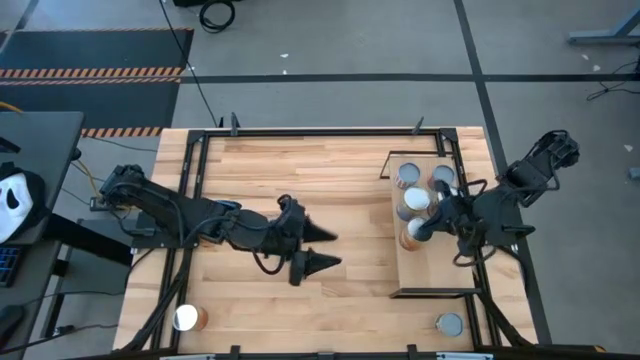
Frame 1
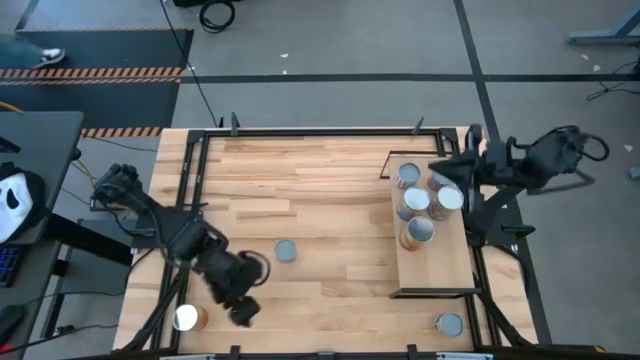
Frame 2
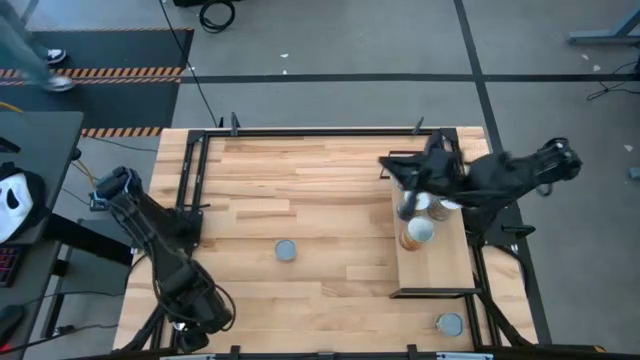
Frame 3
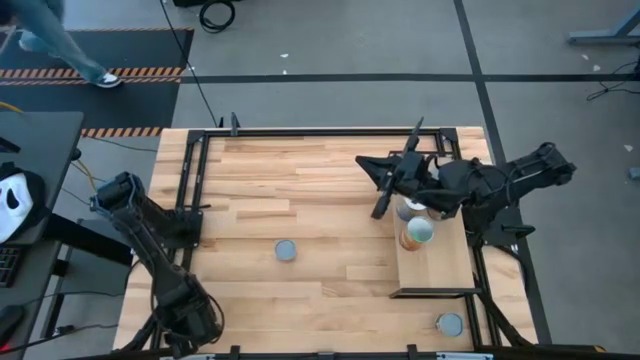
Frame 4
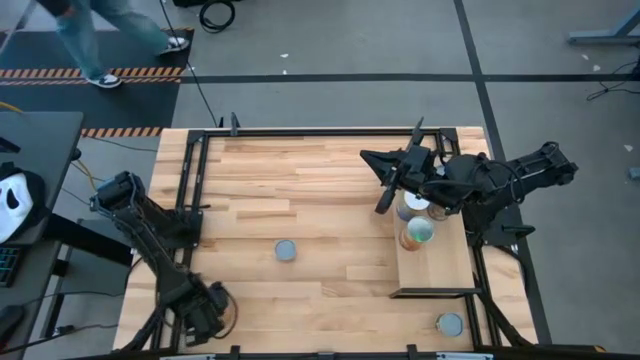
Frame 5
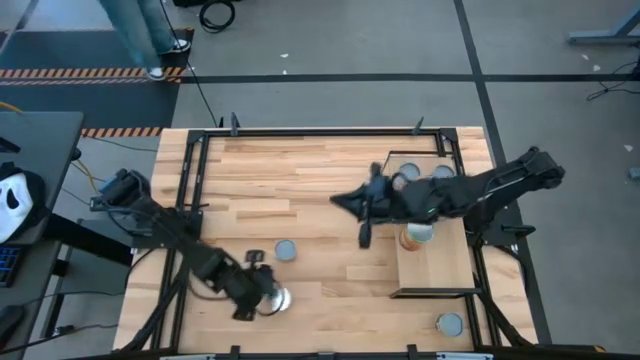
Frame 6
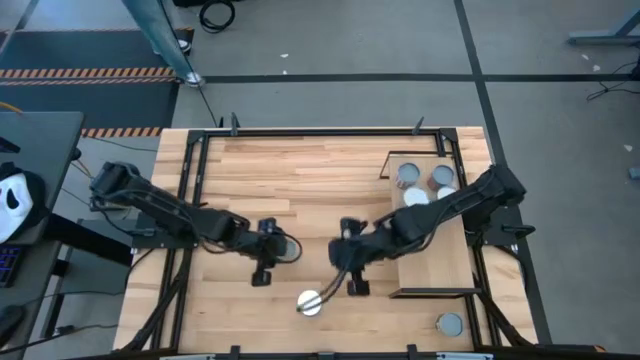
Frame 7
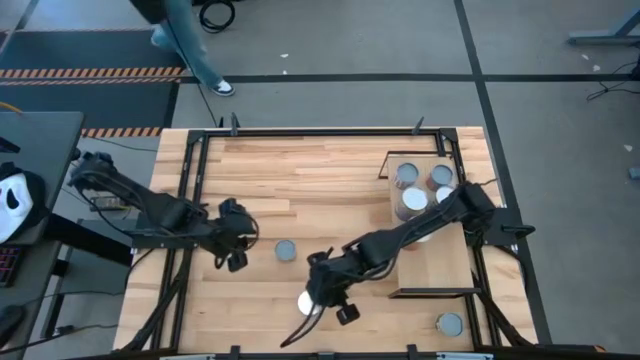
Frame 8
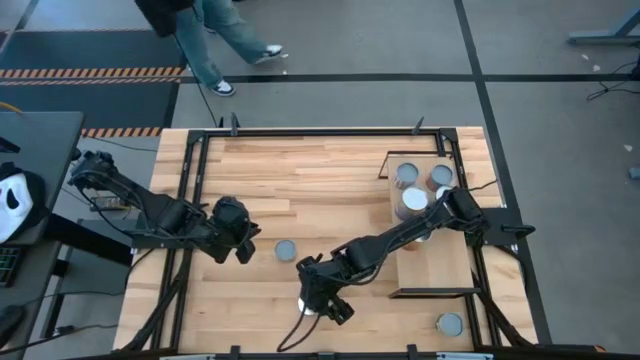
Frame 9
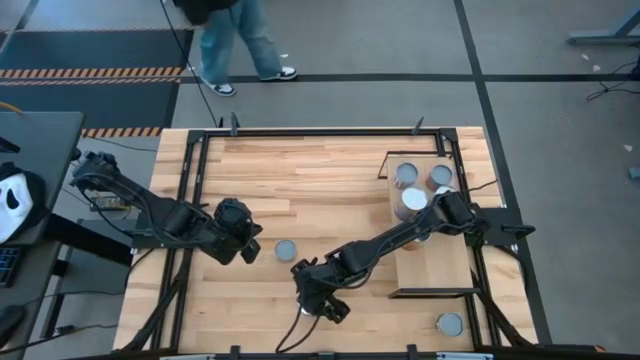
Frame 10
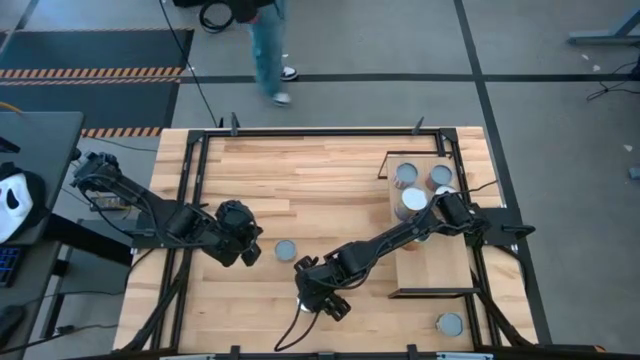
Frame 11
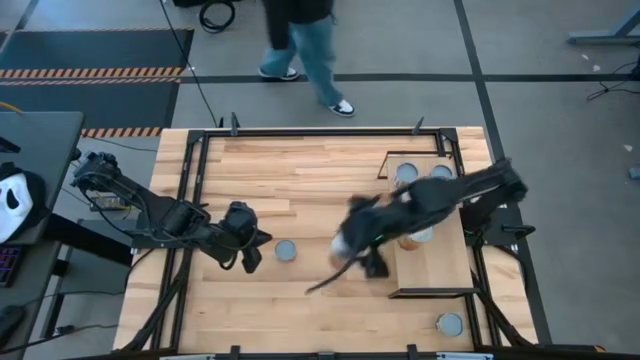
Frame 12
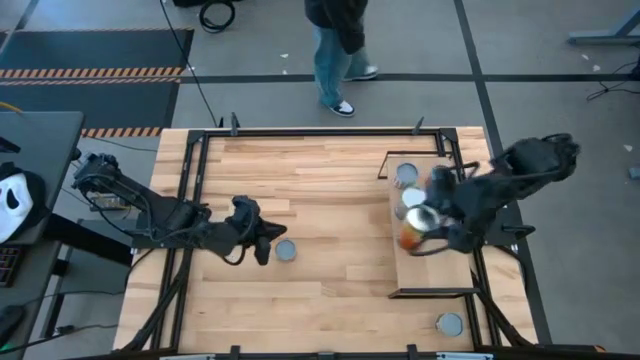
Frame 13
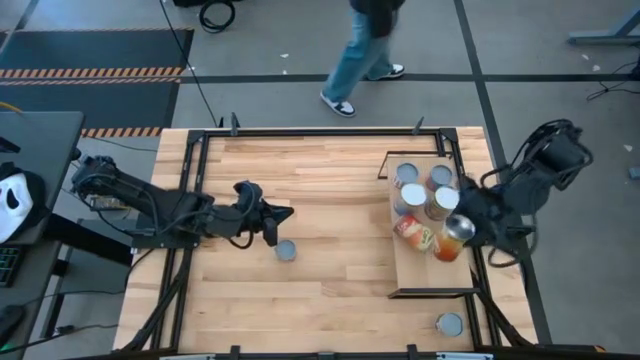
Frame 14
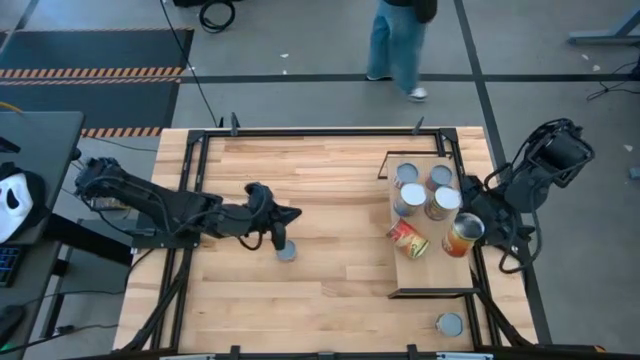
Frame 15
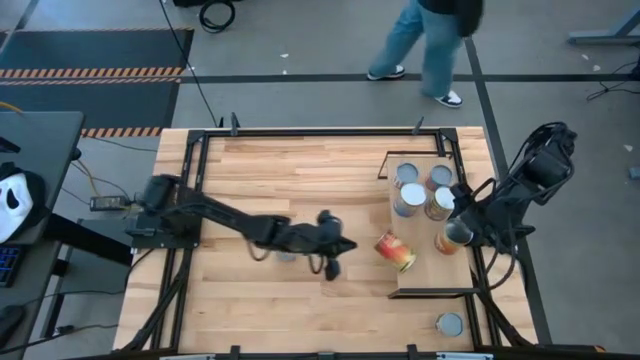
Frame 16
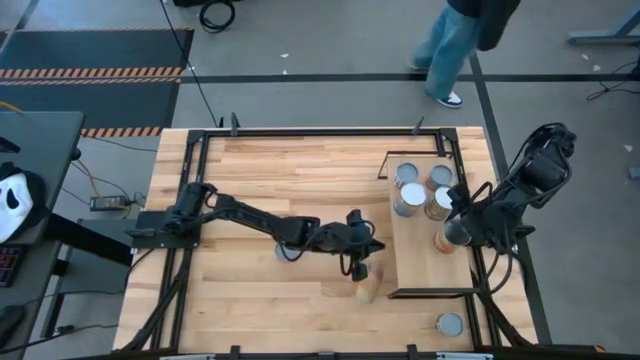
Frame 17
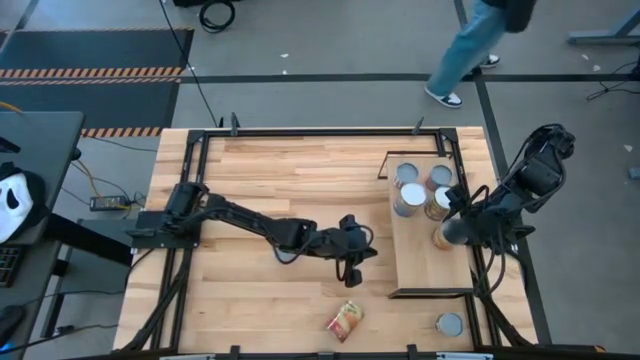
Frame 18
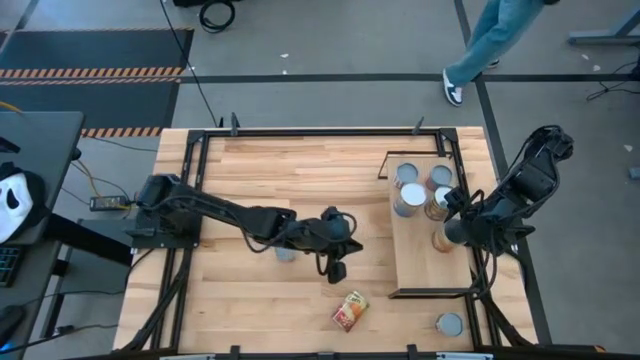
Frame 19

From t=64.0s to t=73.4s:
Task: Pick and place cans onto a shelf
Put the canned corn on the shelf

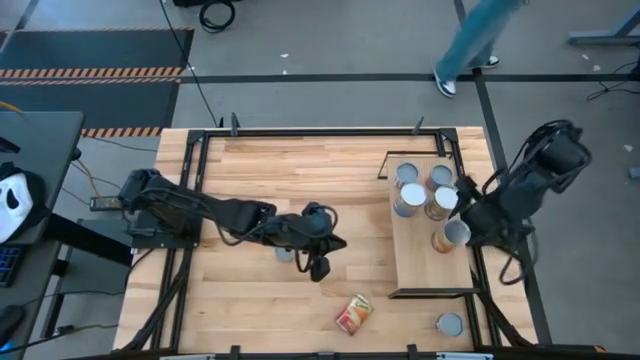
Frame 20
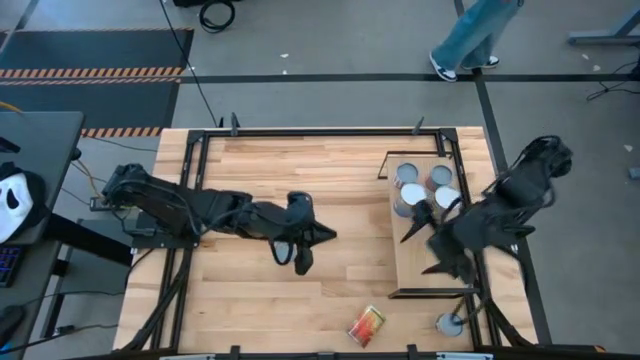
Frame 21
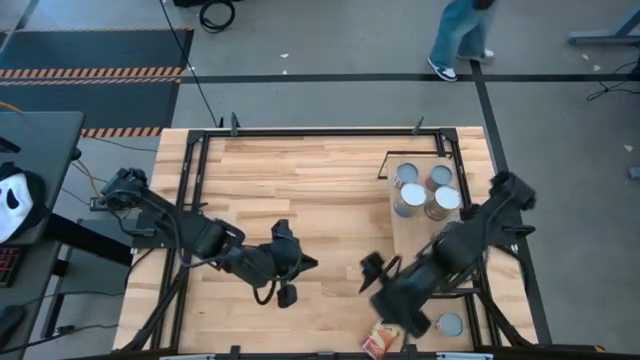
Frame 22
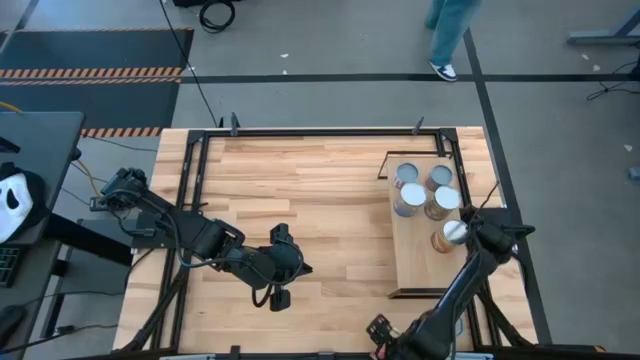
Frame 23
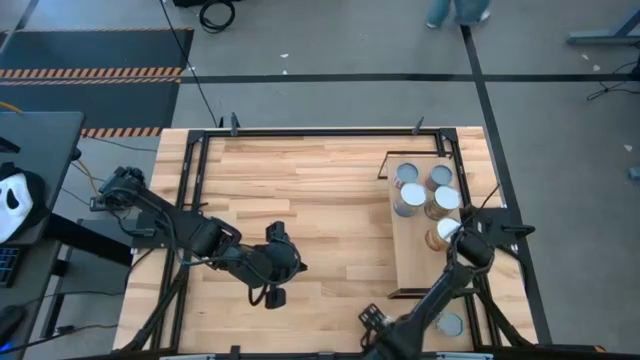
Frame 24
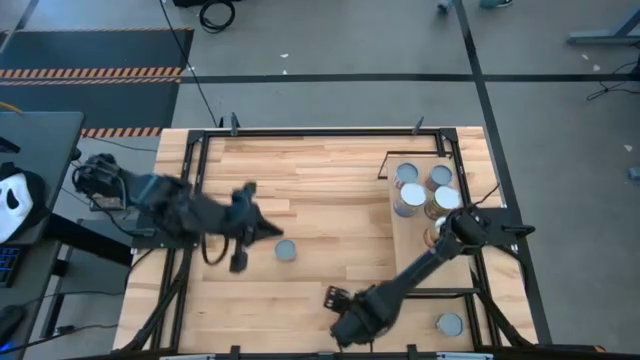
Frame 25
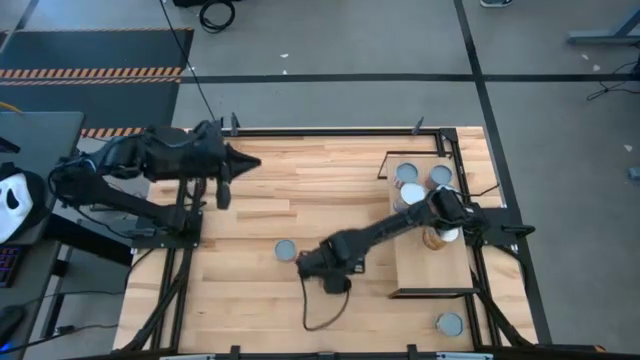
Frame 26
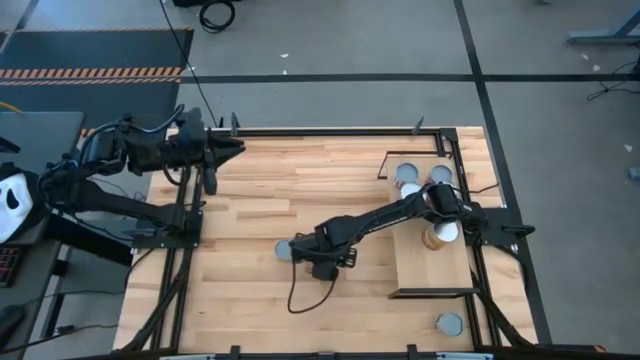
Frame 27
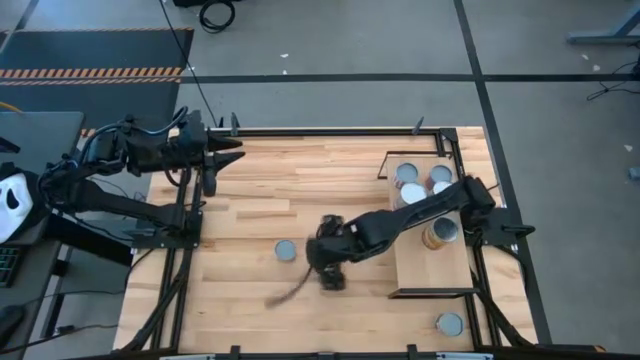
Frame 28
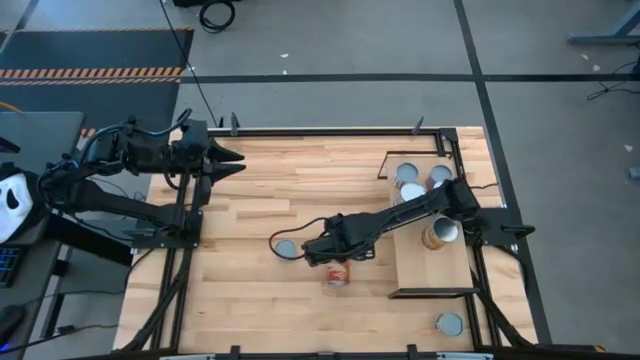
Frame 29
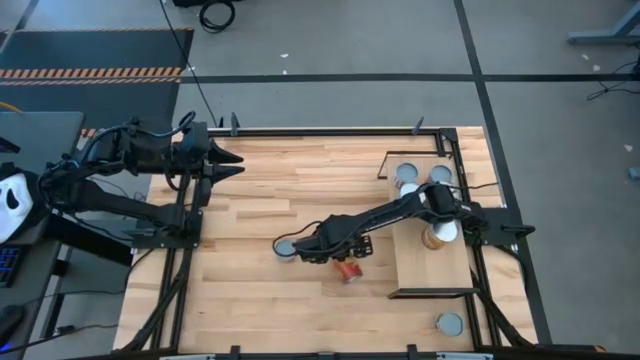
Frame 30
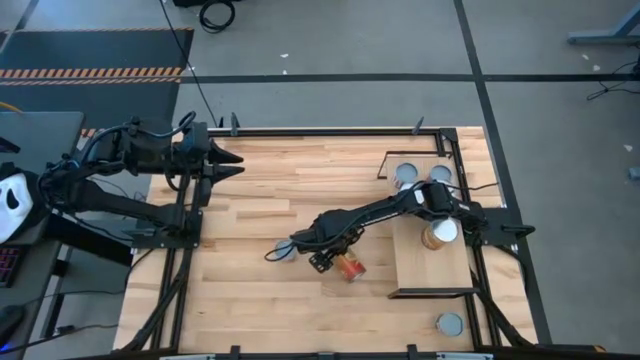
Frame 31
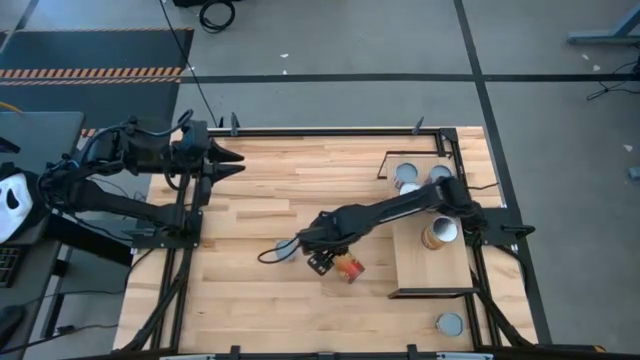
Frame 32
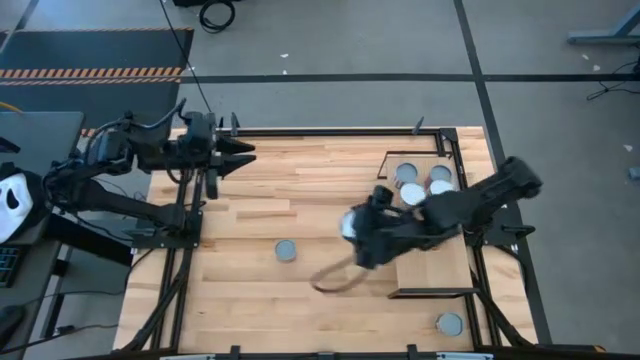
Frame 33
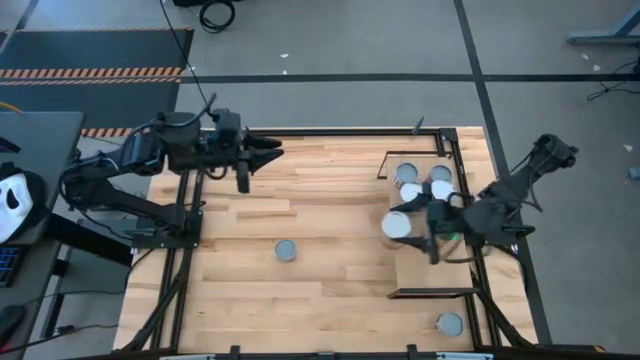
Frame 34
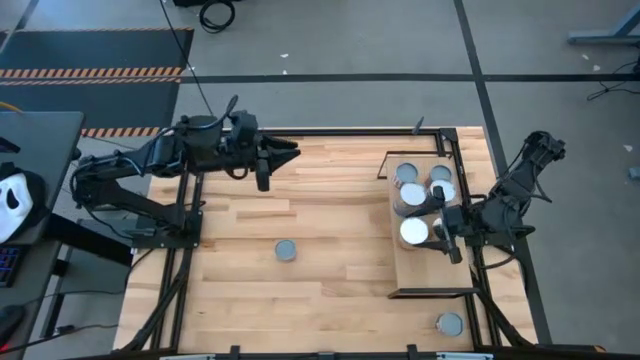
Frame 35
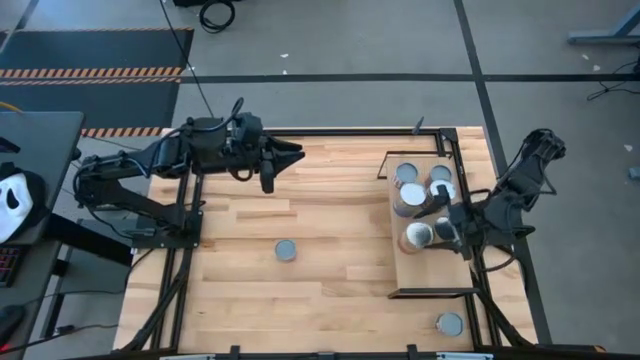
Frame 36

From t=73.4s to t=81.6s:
Put the canned corn on the shelf

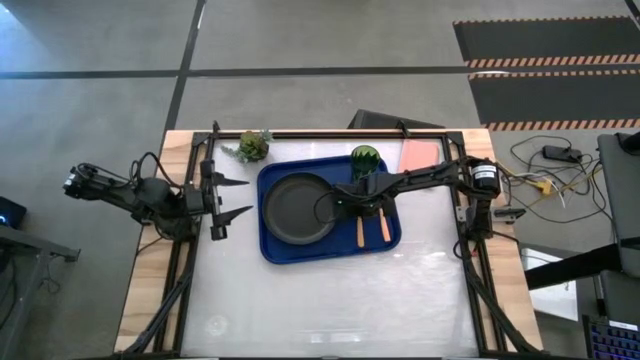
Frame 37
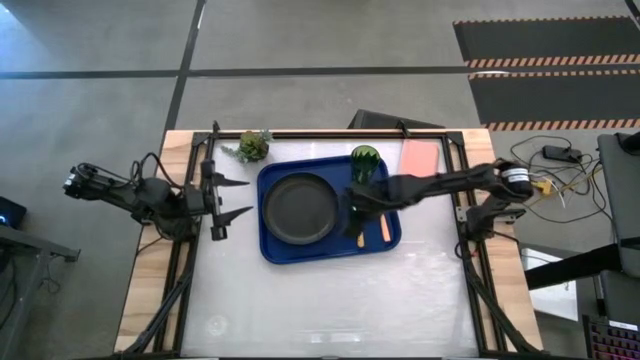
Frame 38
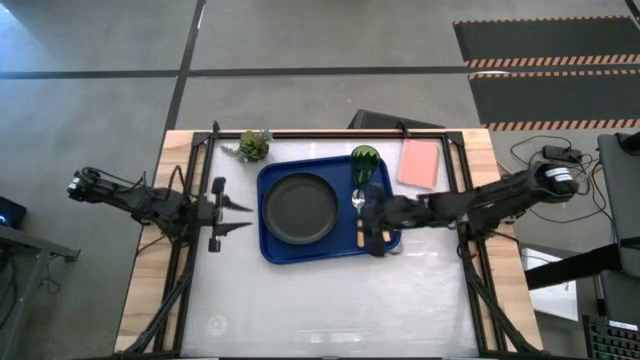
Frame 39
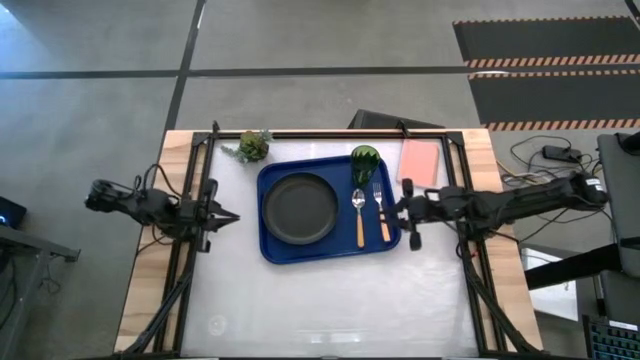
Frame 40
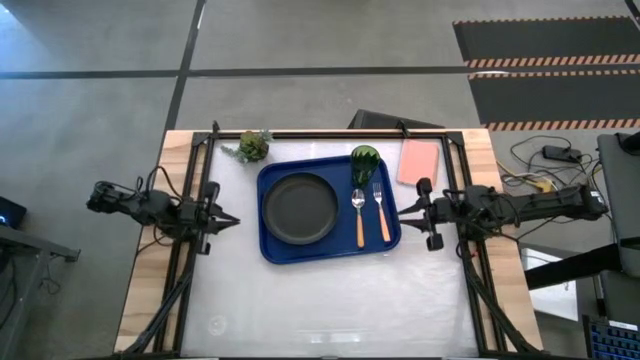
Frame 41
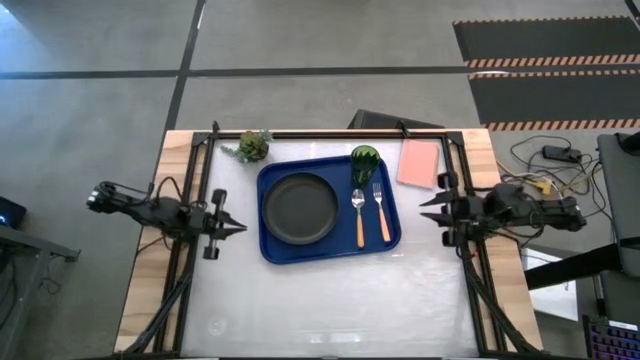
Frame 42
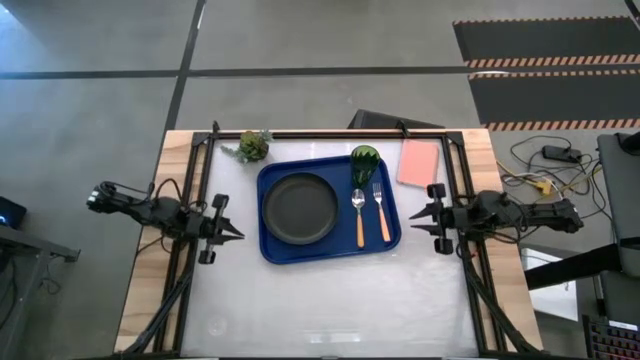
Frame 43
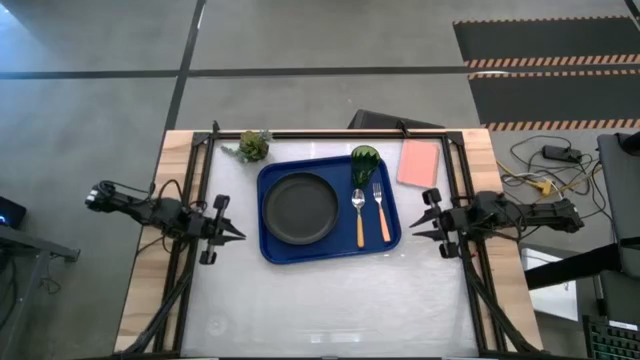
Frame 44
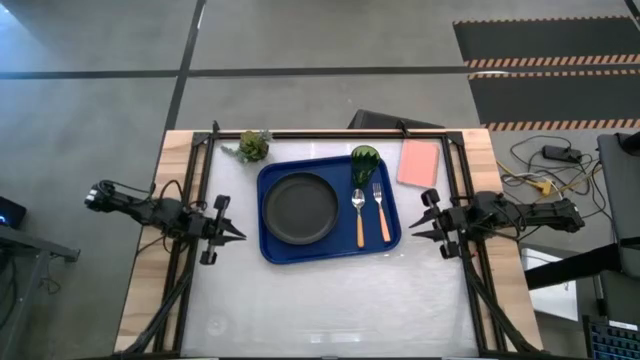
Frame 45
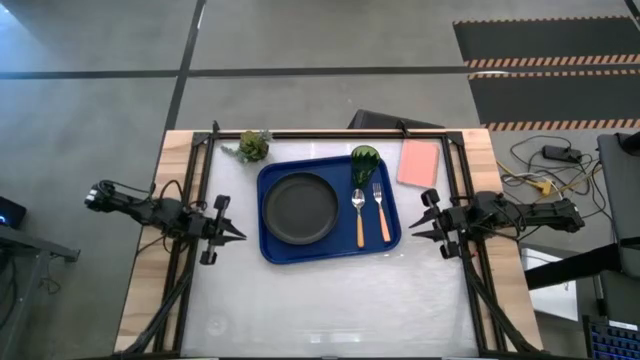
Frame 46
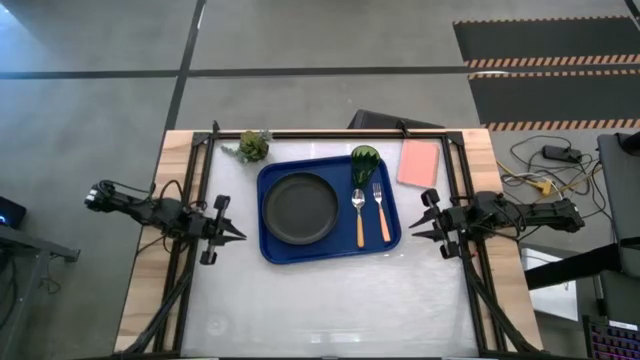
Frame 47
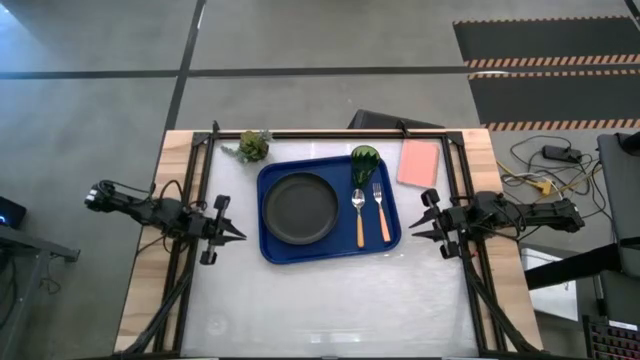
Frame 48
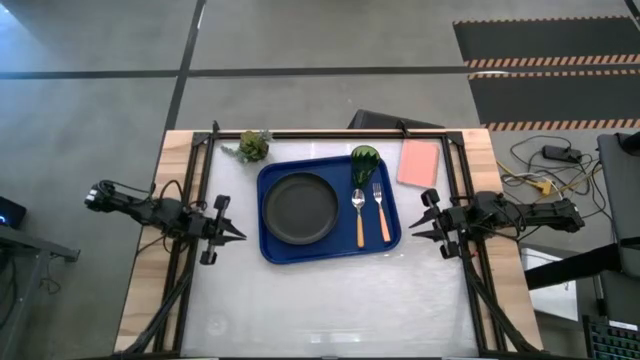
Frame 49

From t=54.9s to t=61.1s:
Task: Pick and place plate/cup/fork/spoon on tray
Return to Home Position
